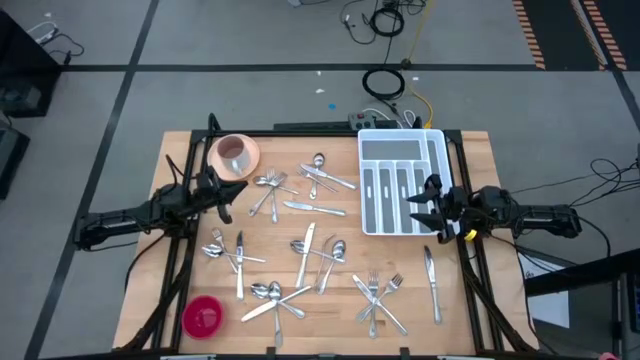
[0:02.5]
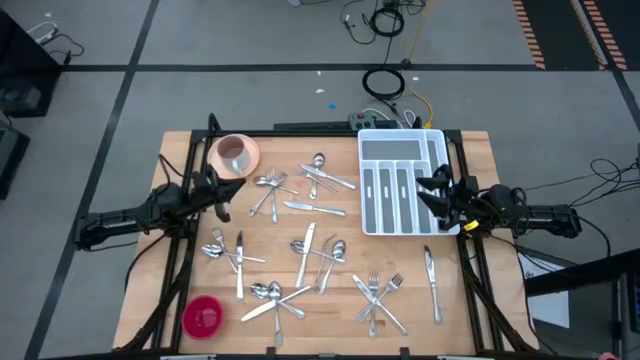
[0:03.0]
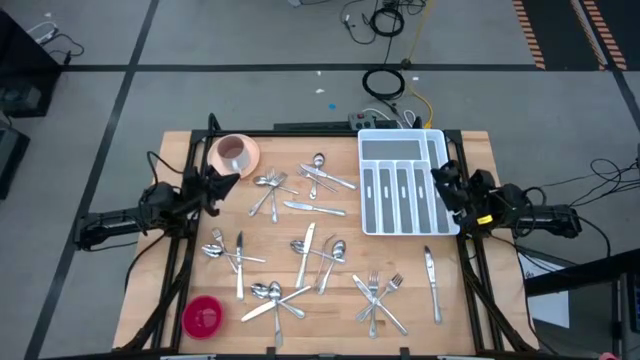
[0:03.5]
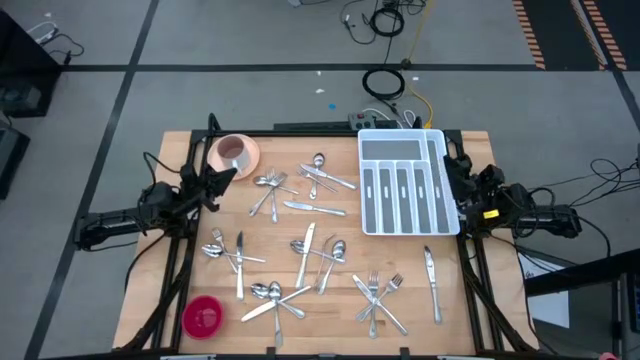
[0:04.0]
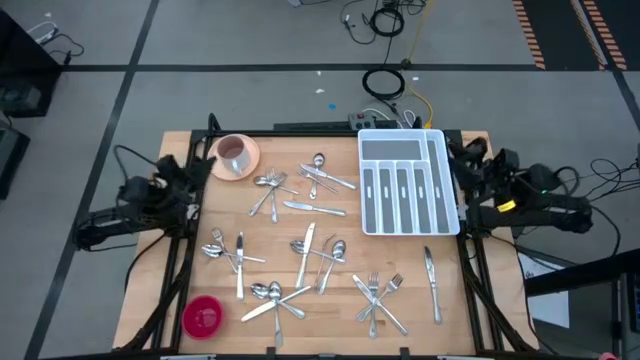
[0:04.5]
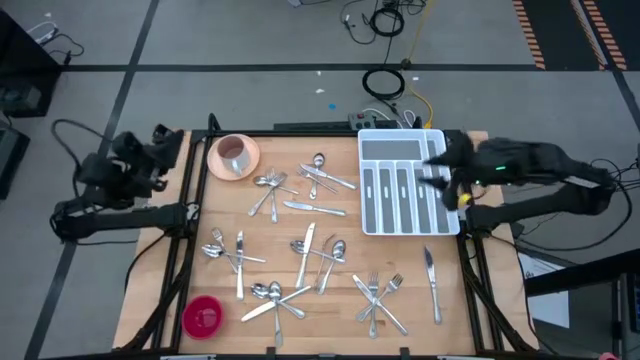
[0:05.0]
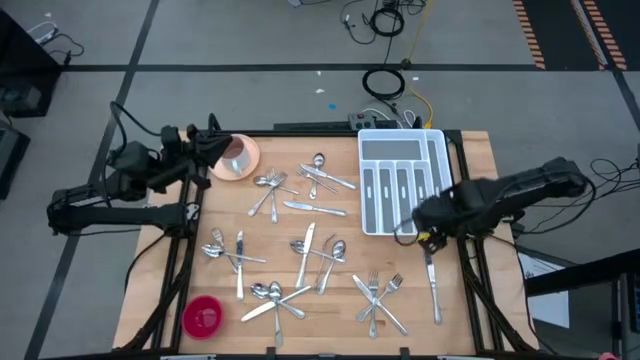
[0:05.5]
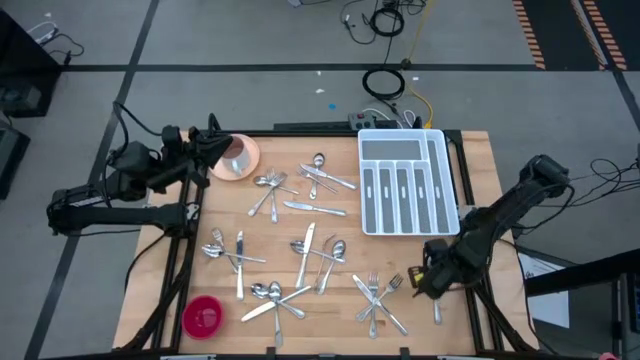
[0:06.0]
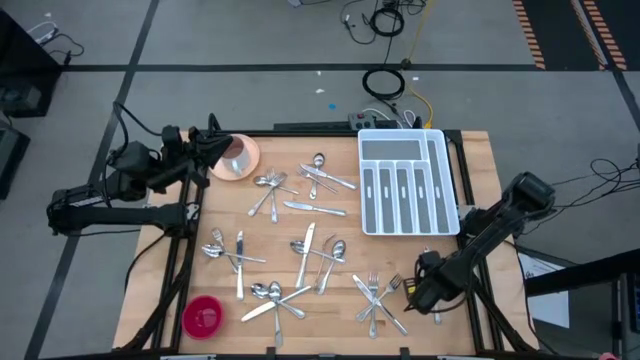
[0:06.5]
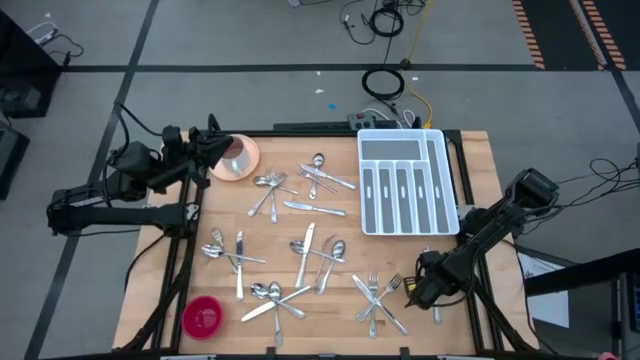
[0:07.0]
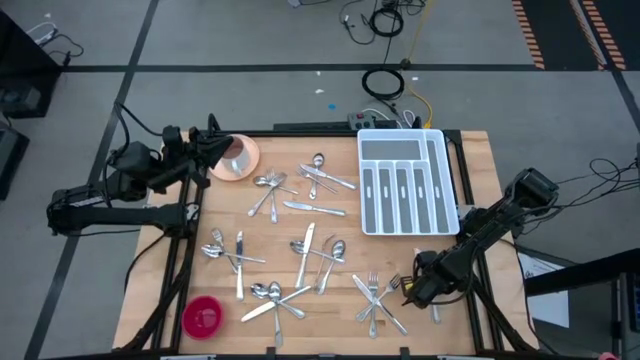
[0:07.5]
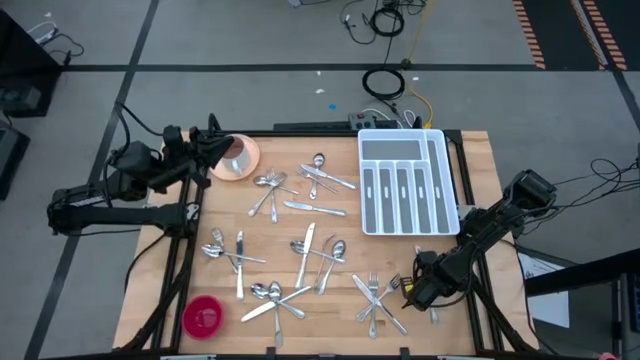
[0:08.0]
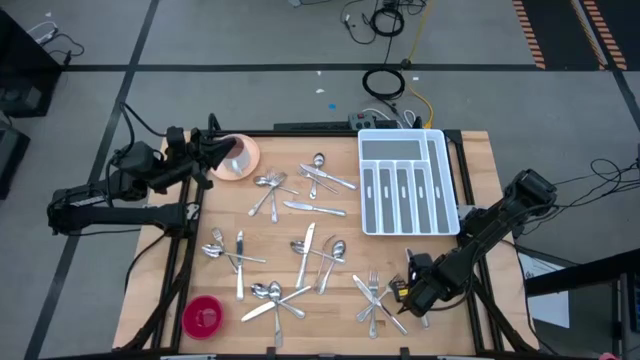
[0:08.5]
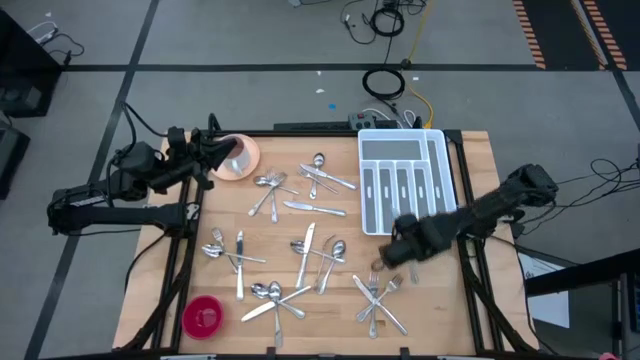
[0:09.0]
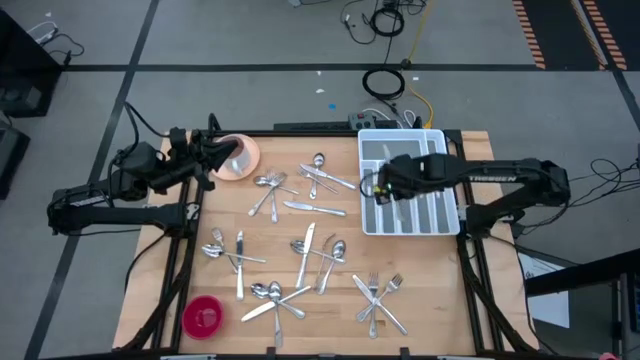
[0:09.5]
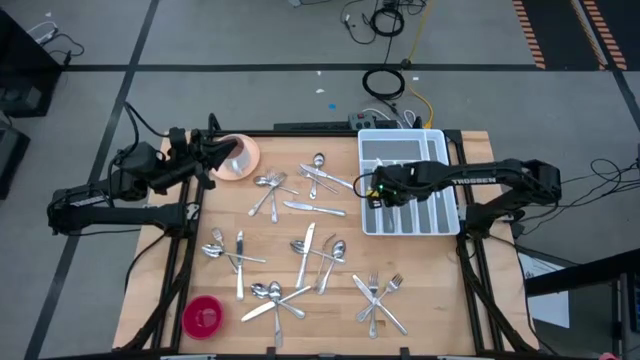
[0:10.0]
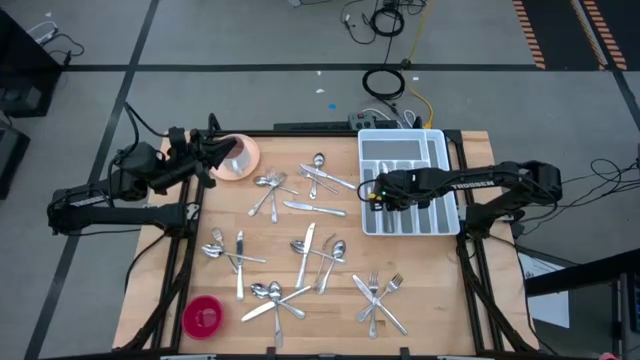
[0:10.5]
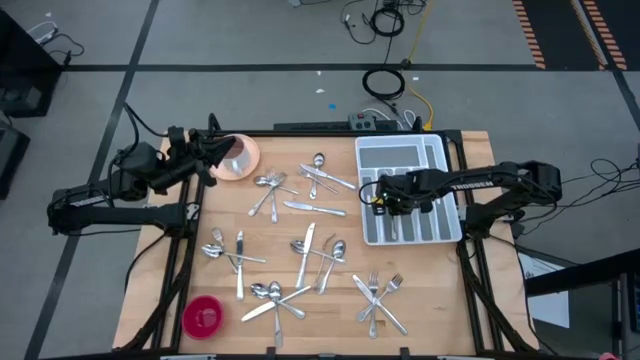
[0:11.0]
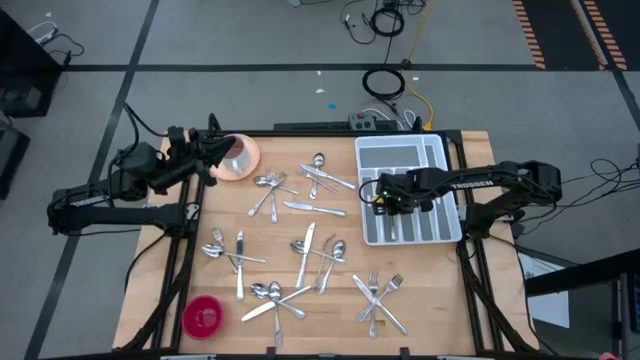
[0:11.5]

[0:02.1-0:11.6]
Task: Sort silverware
Put the silver knife into the white silverware tray

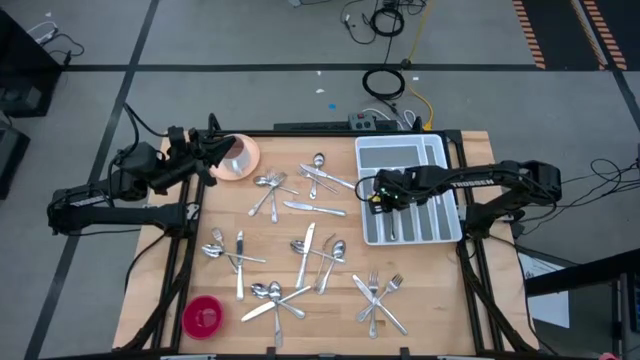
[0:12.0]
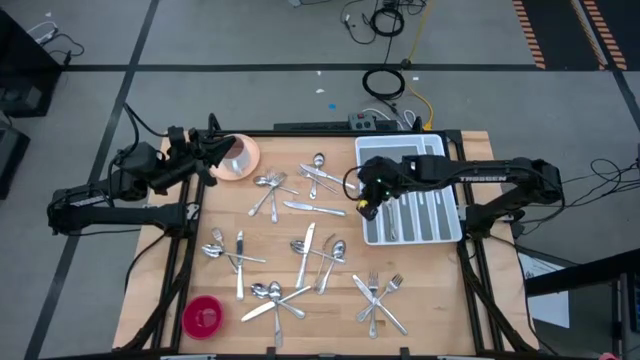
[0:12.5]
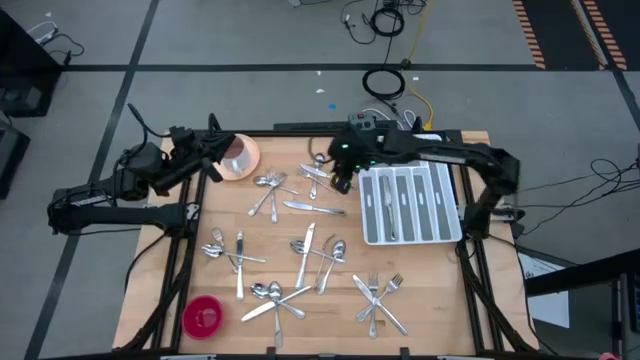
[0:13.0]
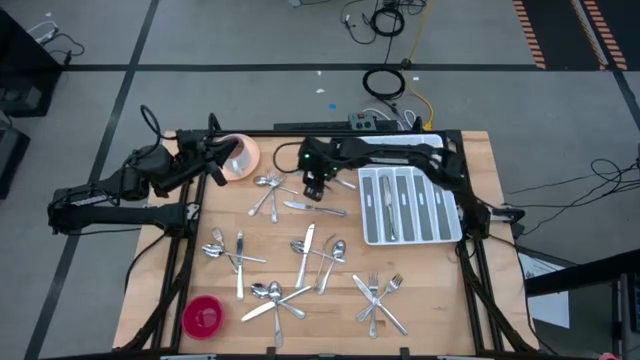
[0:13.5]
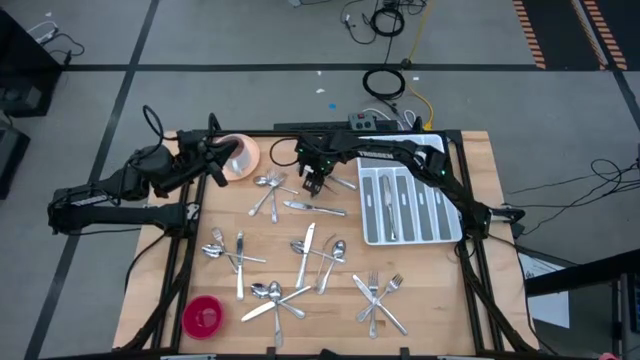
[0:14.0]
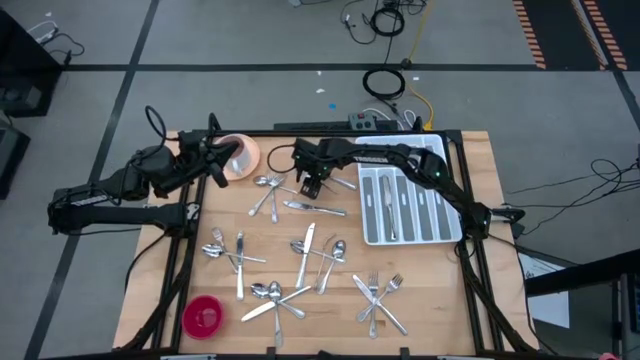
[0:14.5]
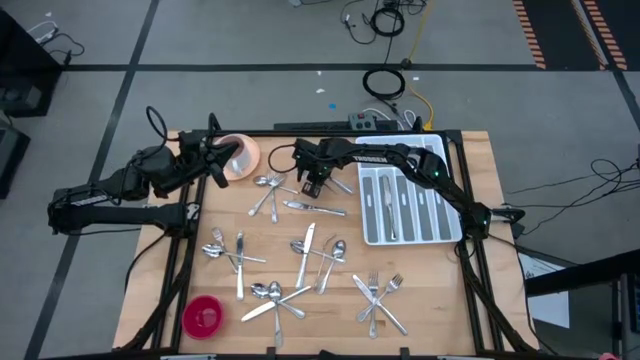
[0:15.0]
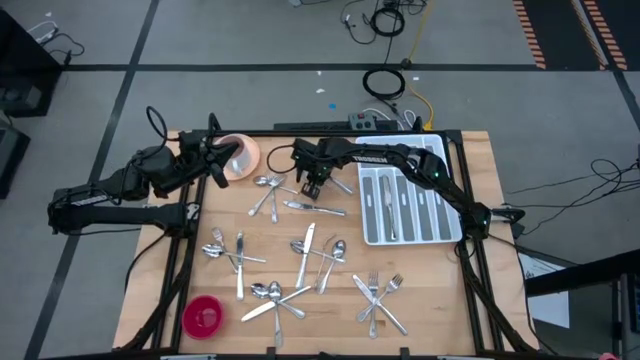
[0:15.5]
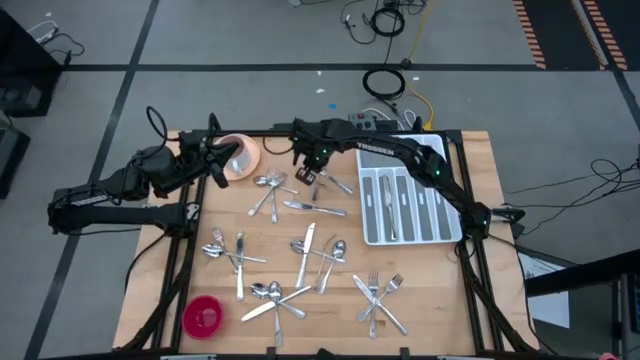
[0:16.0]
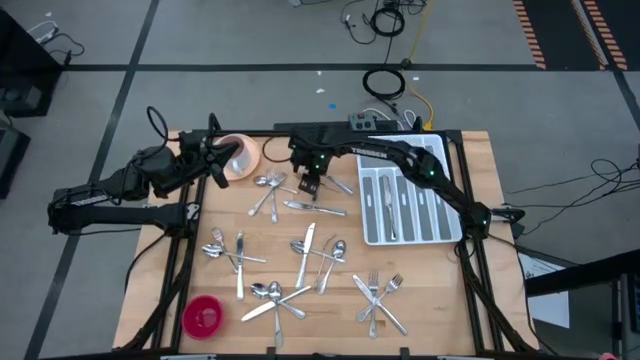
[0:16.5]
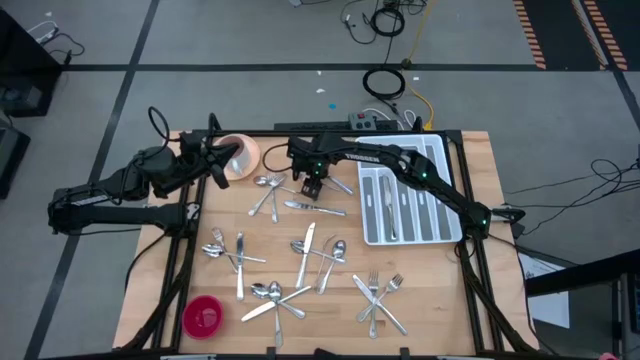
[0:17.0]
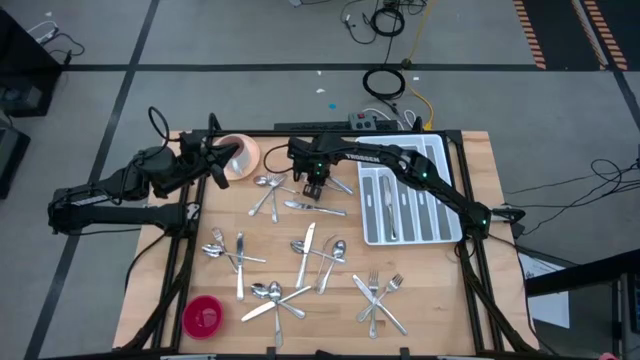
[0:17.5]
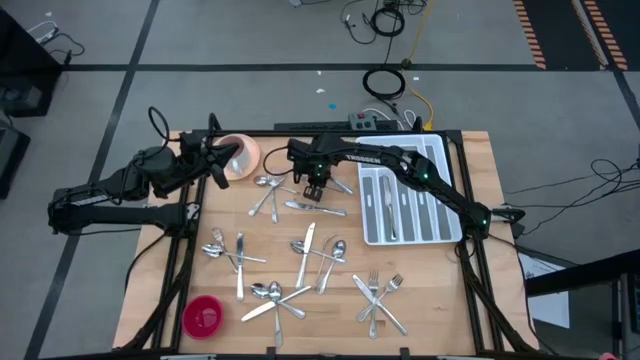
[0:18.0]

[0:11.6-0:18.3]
Put the silver fork into the white silverware tray

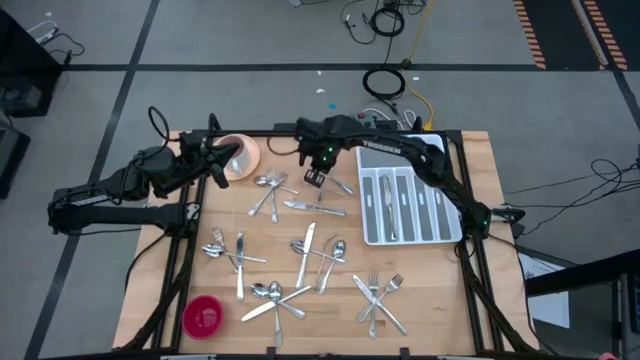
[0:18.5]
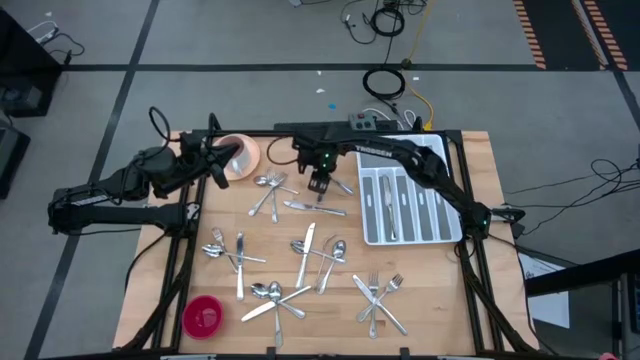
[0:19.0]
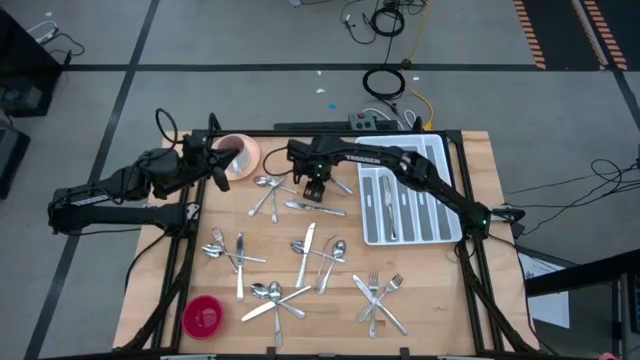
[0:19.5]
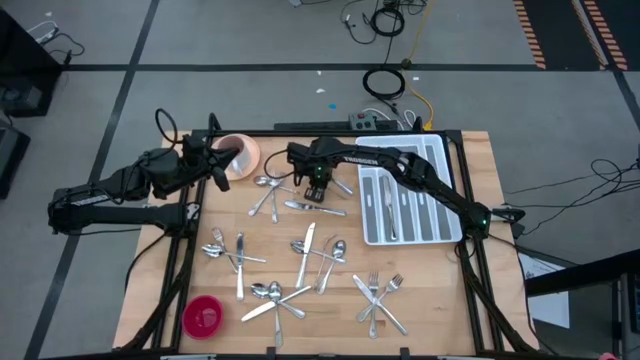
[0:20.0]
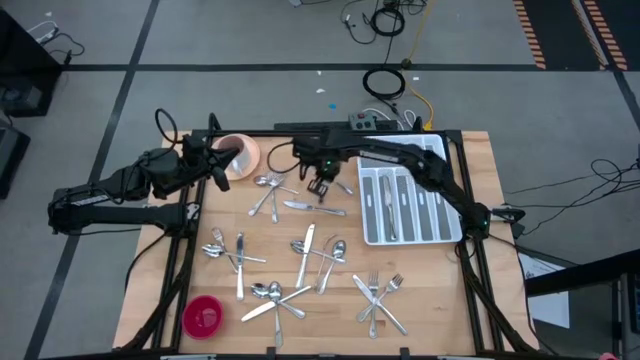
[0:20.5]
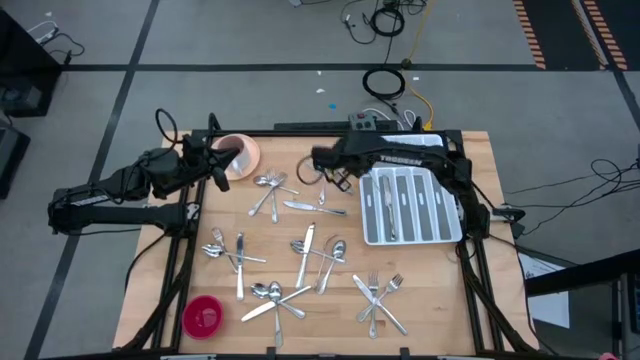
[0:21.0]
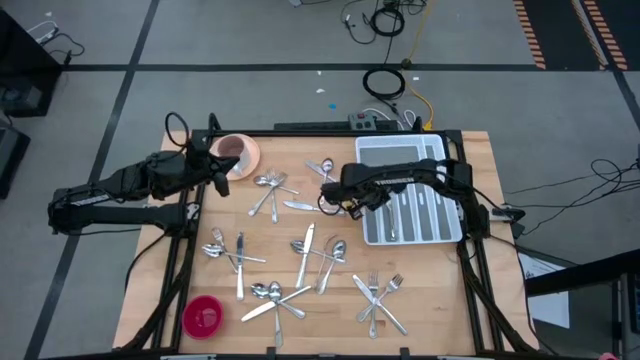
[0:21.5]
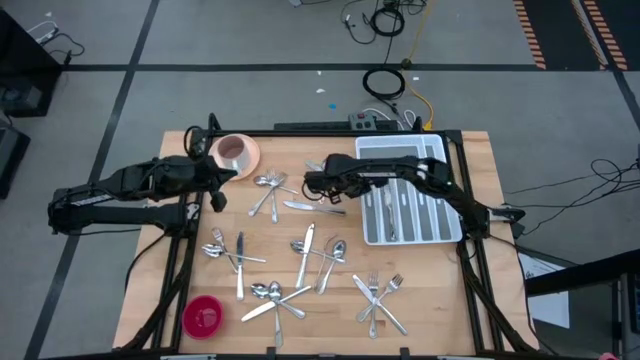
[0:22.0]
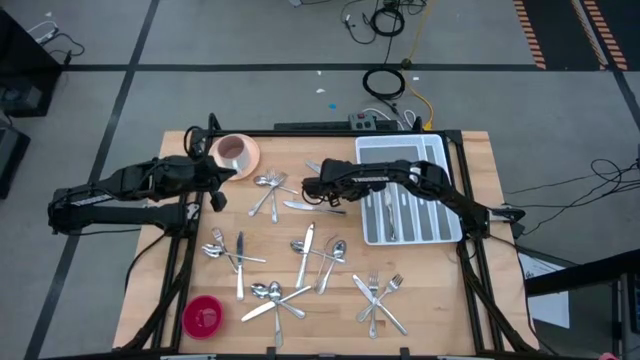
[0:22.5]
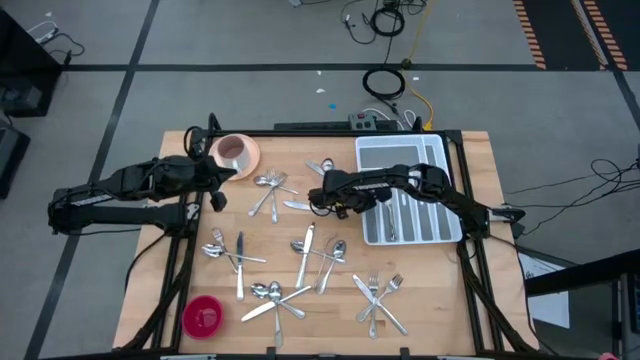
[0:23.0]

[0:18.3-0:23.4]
Put the silver fork into the white silverware tray
